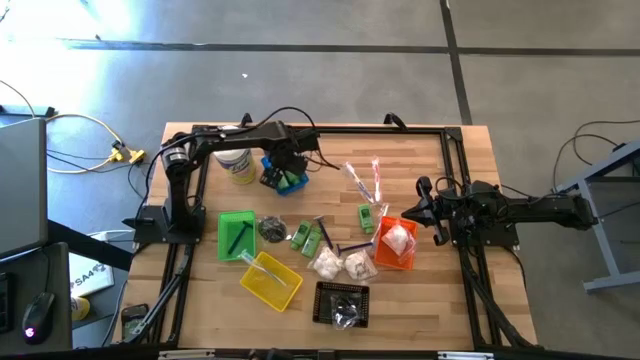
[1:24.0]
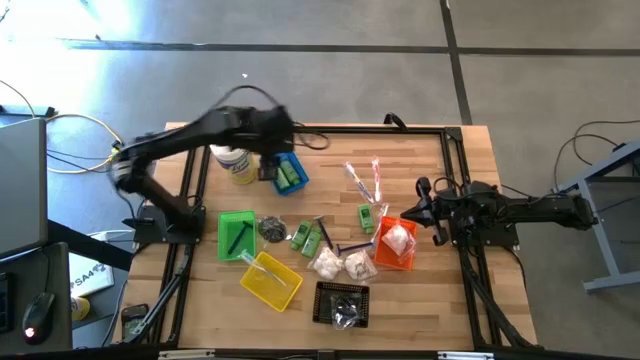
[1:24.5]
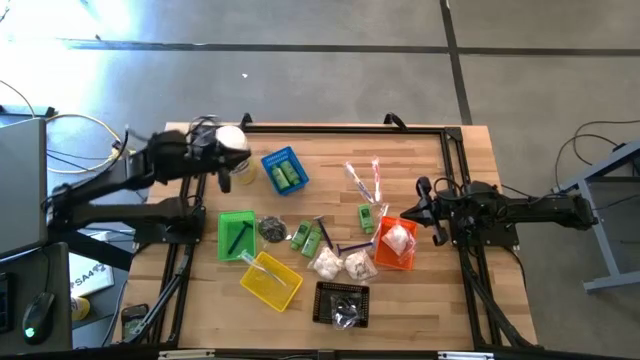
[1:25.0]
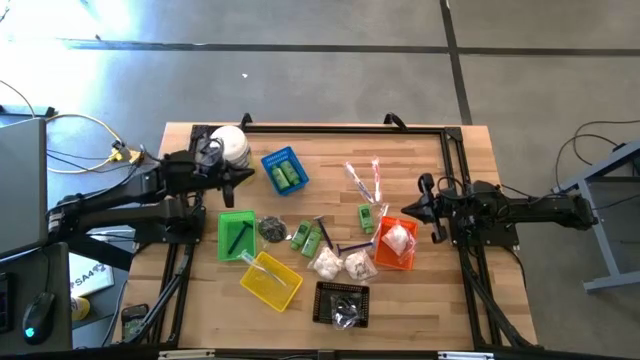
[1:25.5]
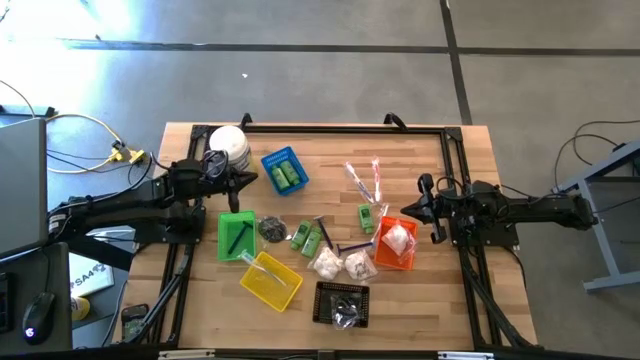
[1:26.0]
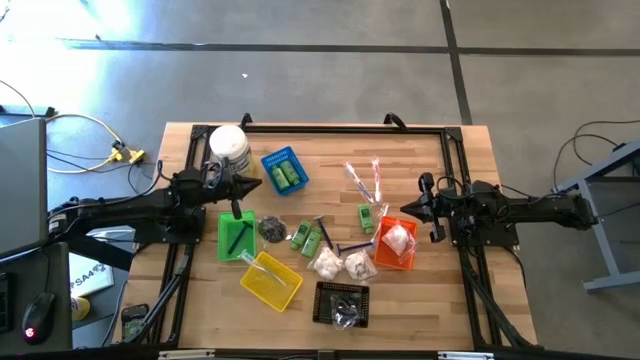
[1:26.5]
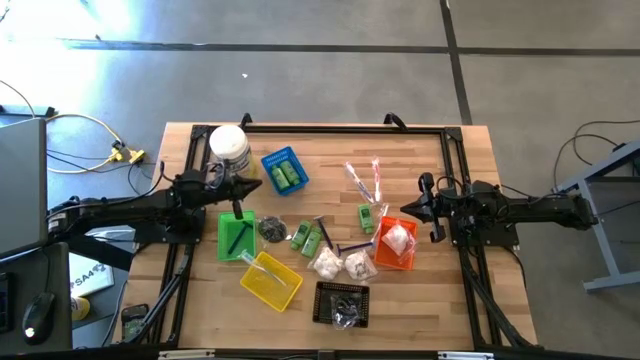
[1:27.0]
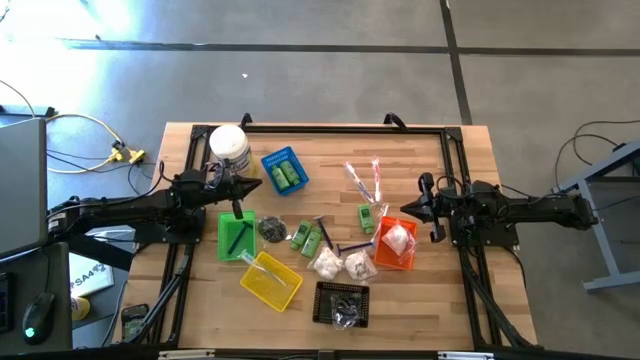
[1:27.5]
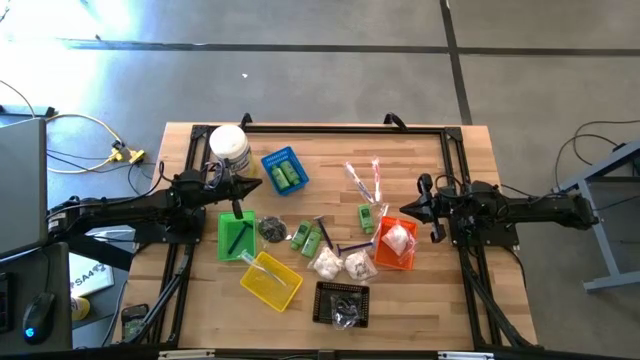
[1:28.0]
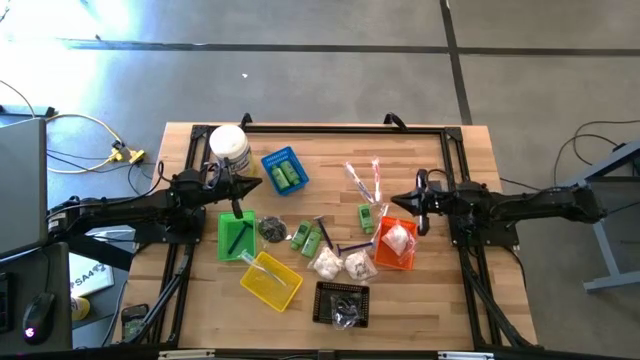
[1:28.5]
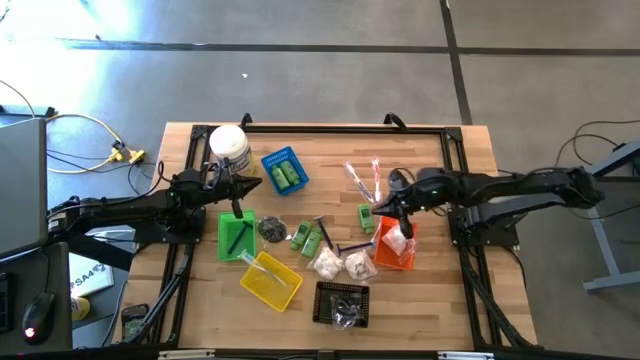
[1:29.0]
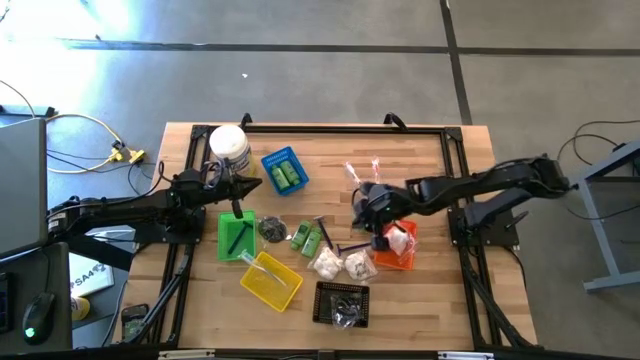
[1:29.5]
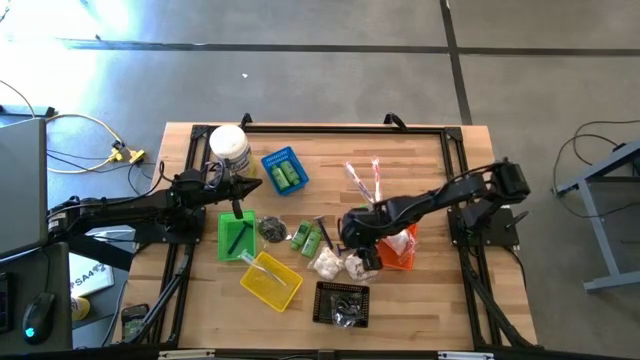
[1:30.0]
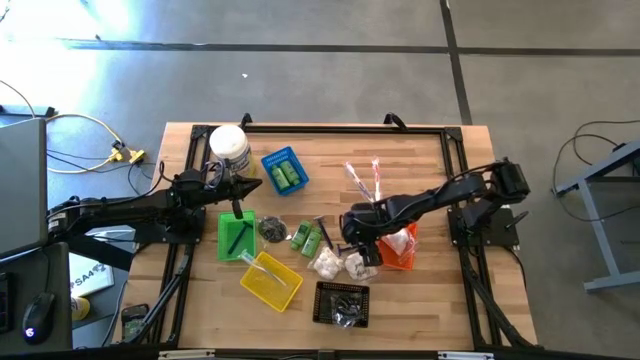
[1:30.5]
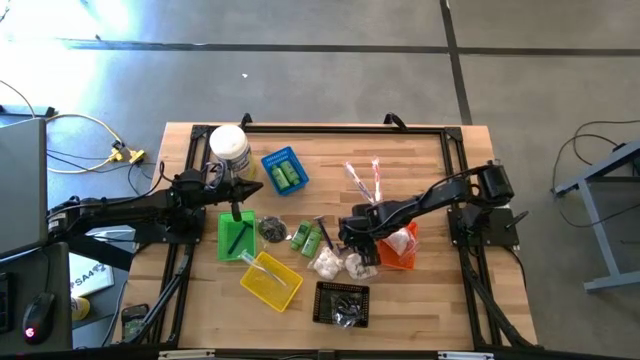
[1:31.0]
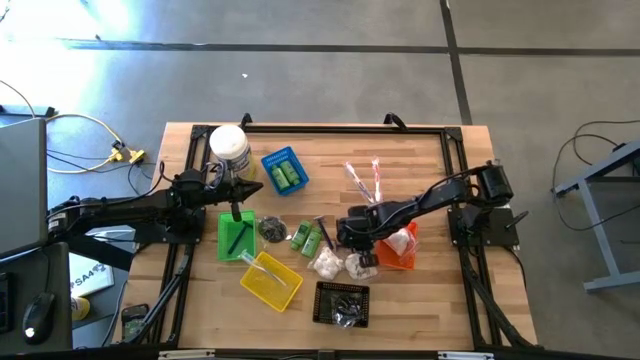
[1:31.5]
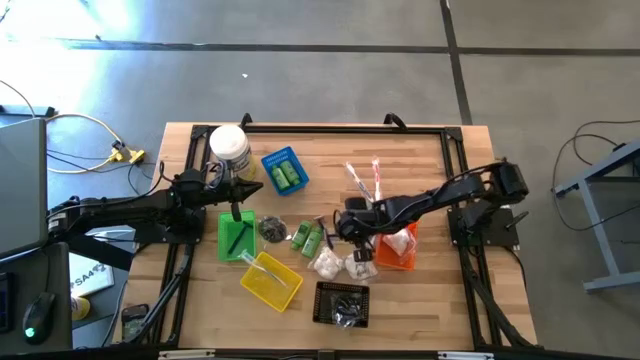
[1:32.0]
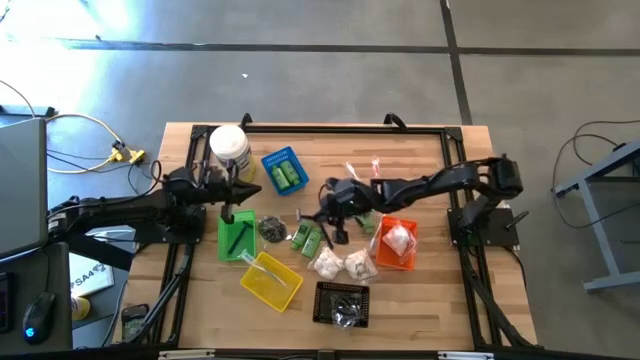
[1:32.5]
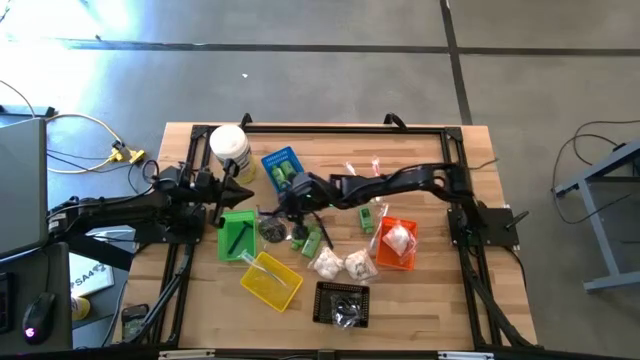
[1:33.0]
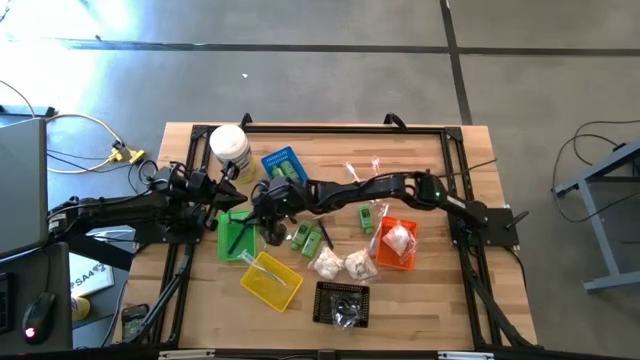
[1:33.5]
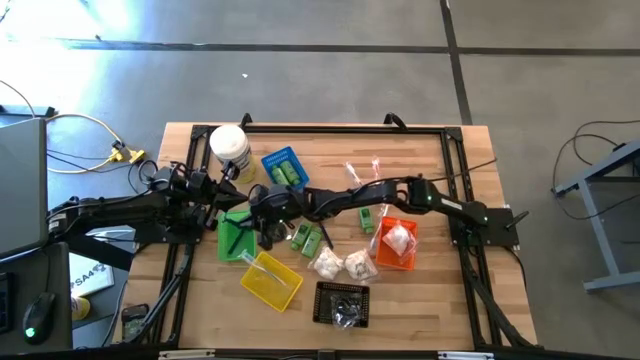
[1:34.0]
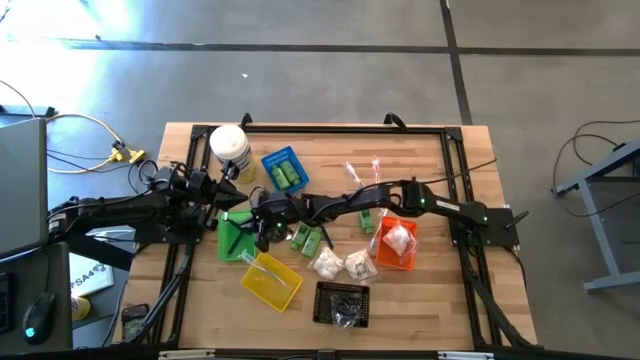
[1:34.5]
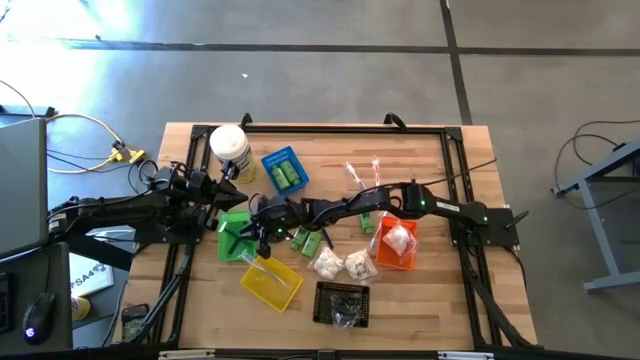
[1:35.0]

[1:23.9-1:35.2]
Task: Pick & Place Travel size toiletries
Put the blue razor into the green bin

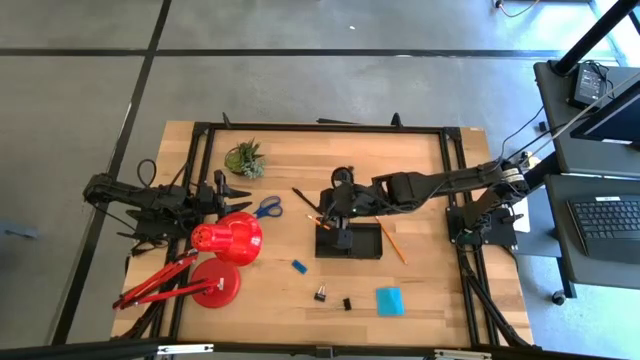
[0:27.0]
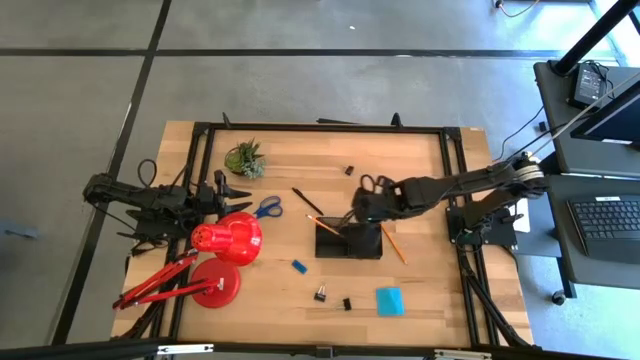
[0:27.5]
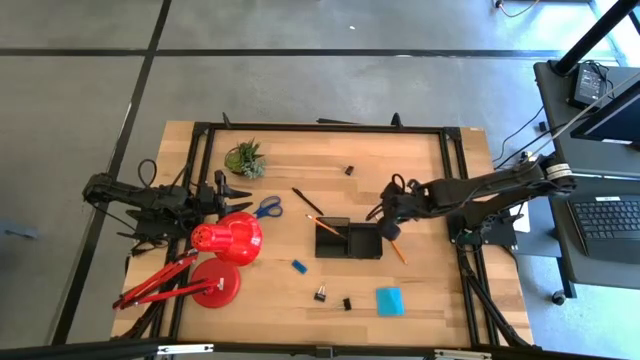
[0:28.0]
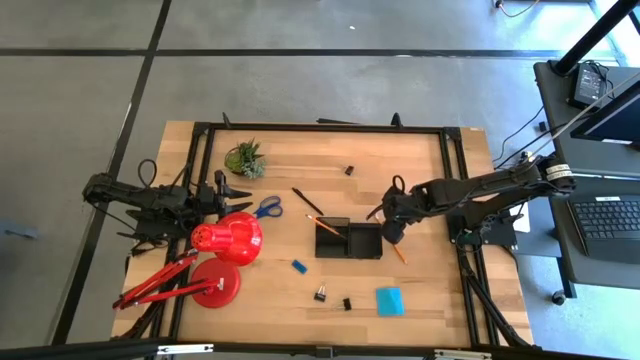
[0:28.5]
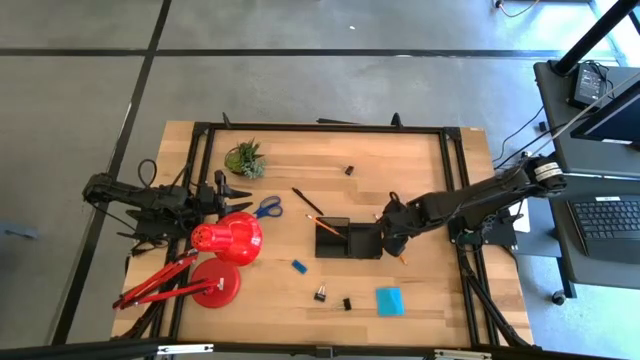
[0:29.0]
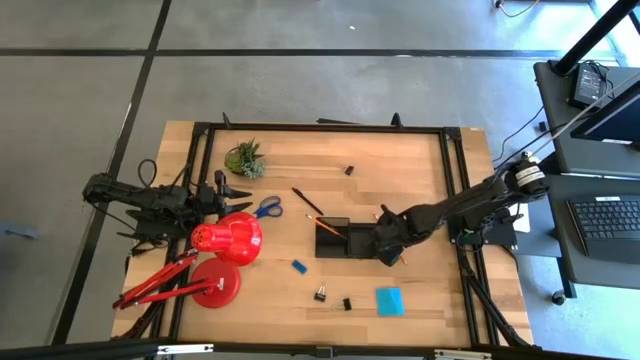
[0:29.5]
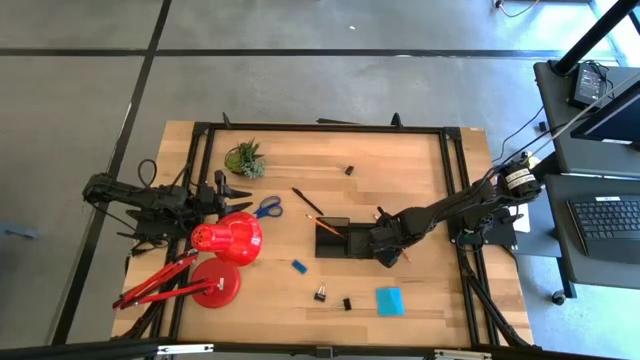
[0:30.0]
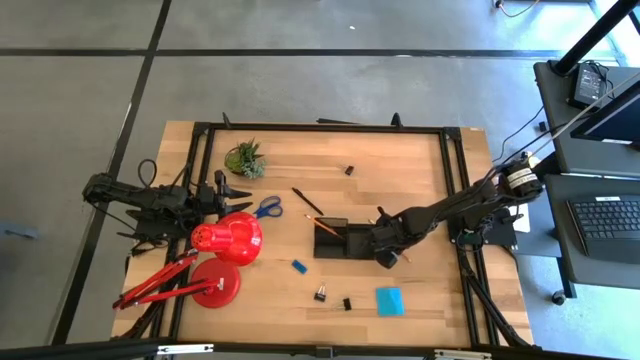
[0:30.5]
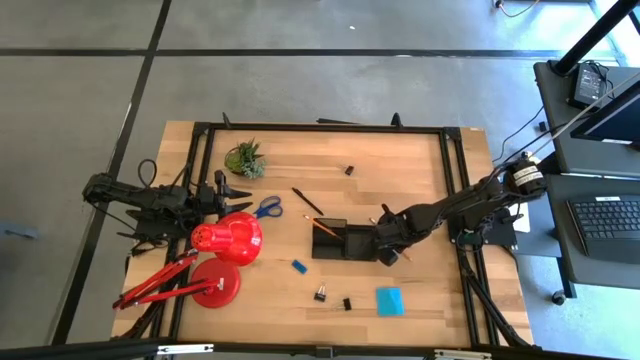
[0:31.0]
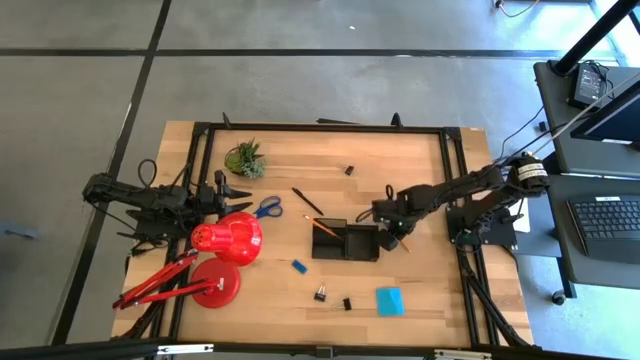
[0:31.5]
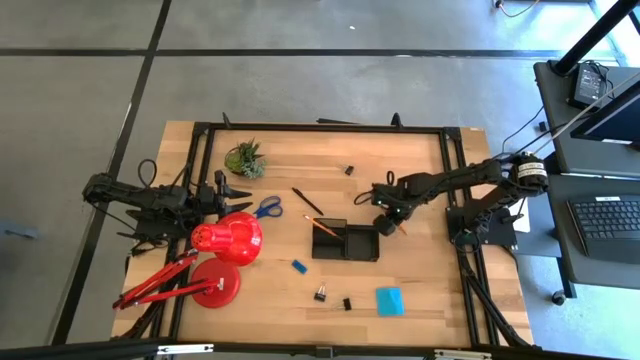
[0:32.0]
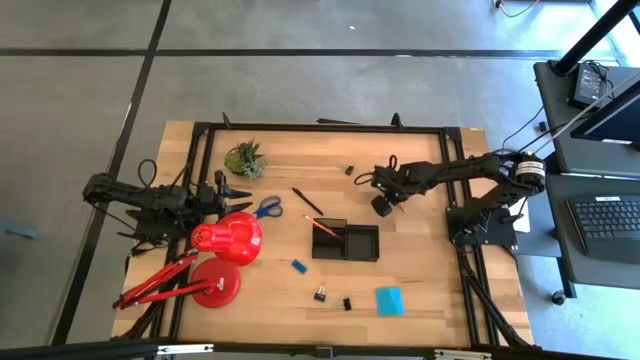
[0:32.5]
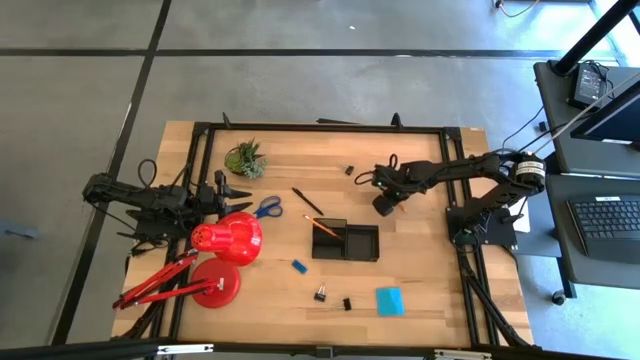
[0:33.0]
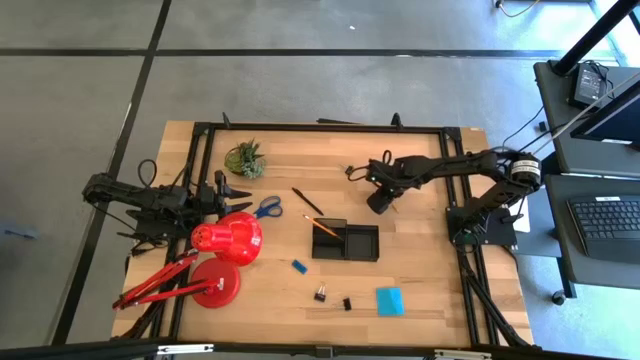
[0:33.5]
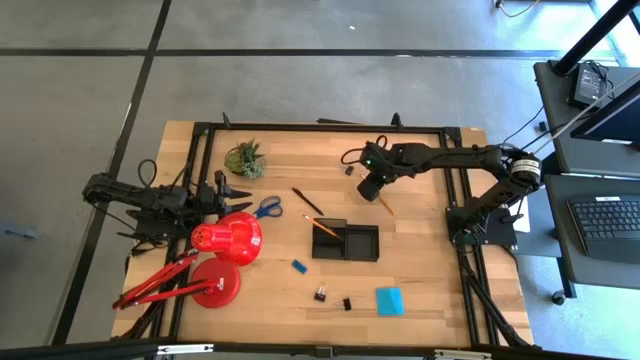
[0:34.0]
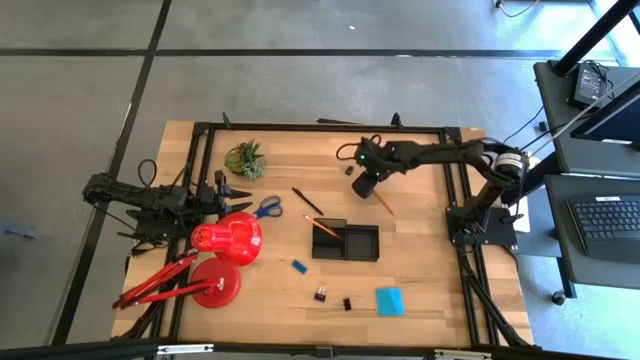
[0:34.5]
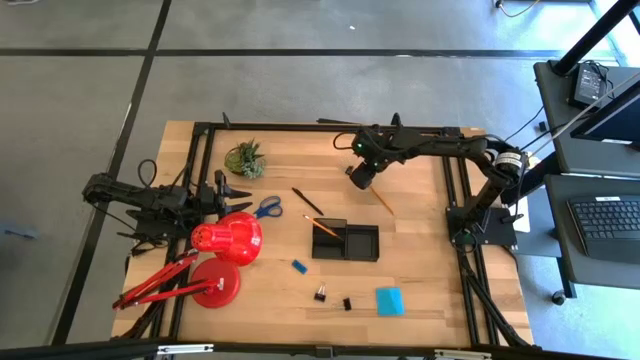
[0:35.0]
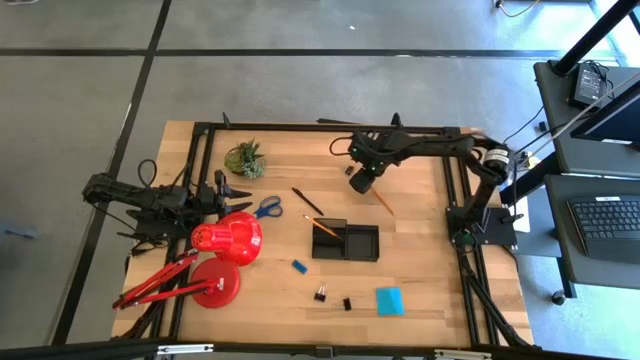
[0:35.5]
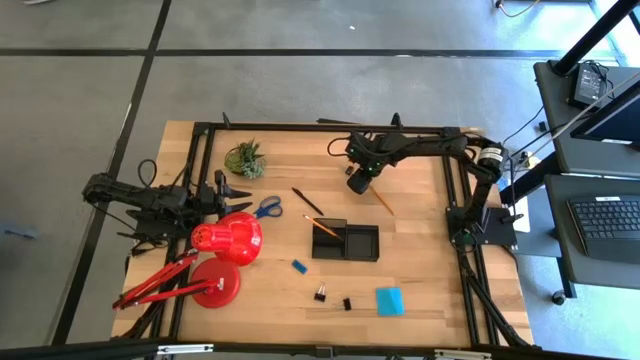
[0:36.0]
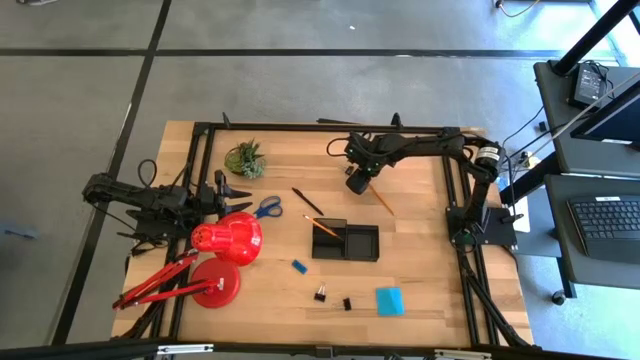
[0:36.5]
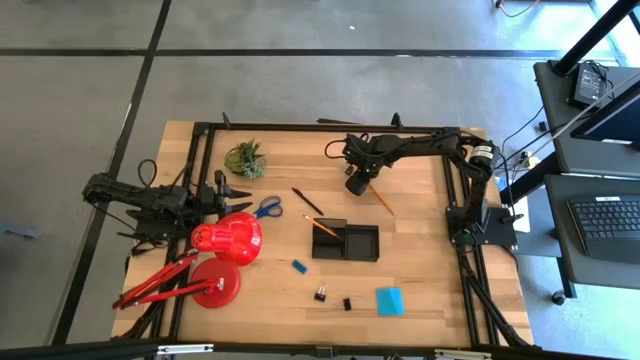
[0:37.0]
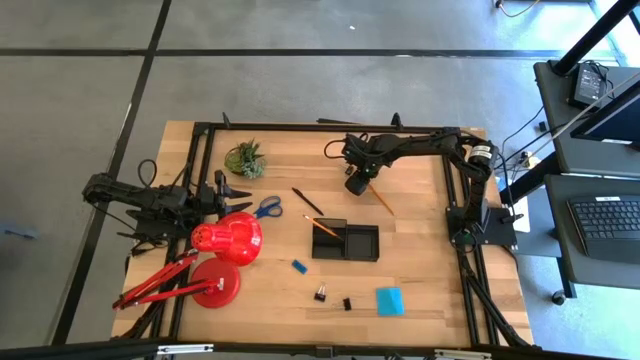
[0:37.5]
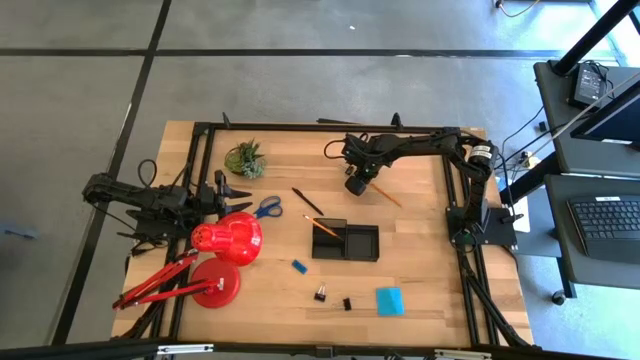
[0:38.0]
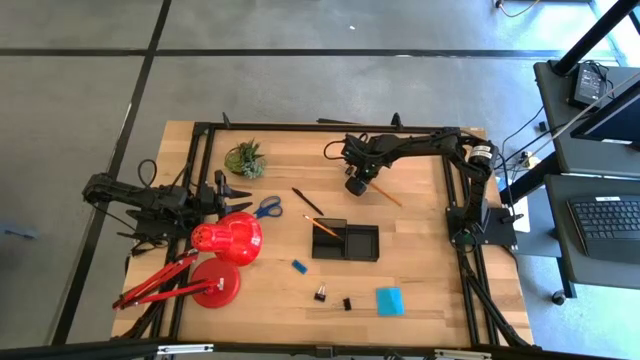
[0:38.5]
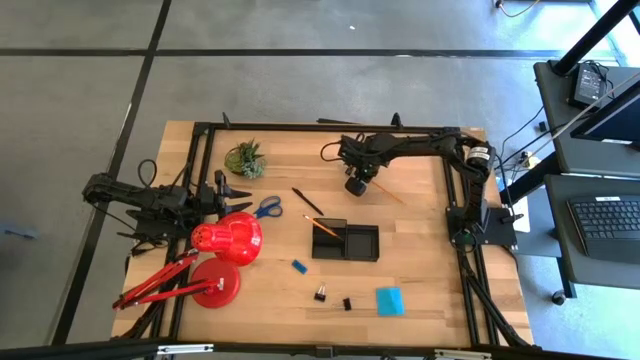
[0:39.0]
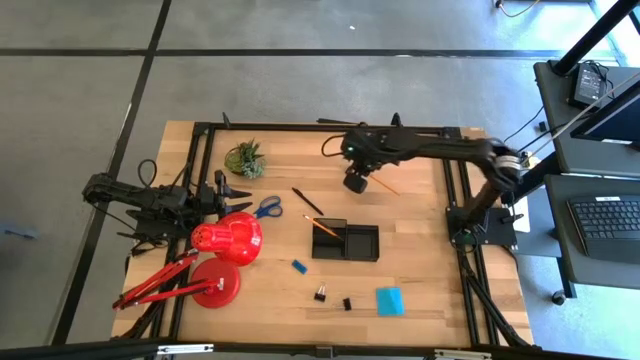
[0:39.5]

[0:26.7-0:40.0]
Task: Pick and place office supplies into organizer
Put the orange pencil into the black desk organizer
